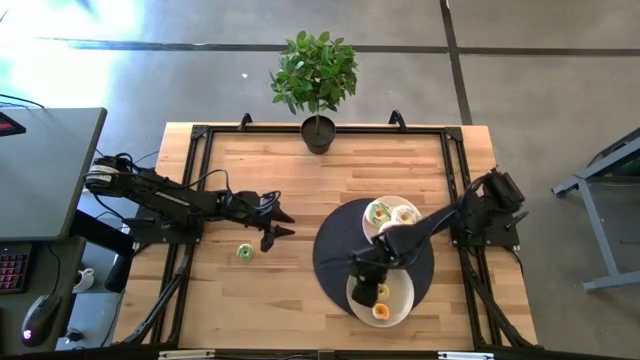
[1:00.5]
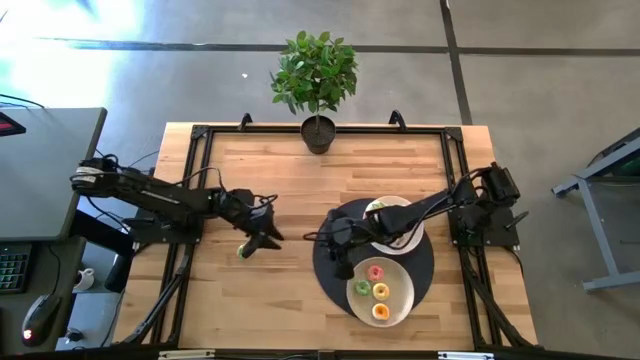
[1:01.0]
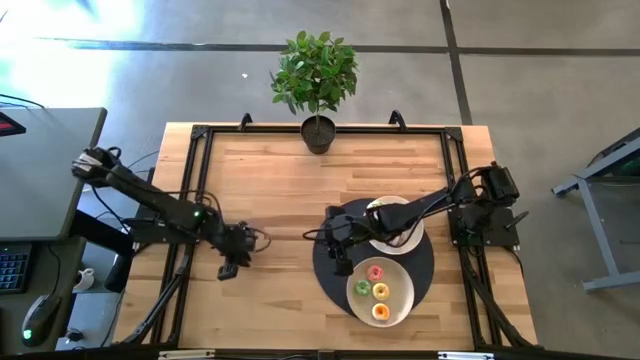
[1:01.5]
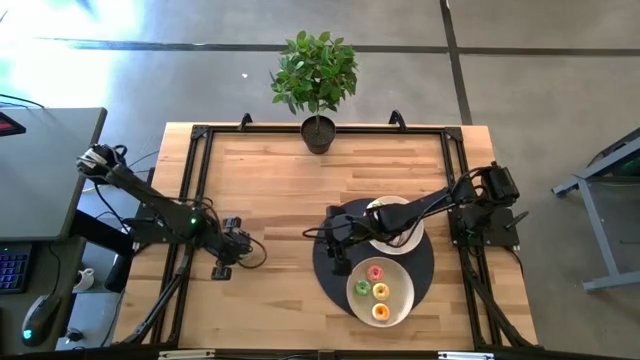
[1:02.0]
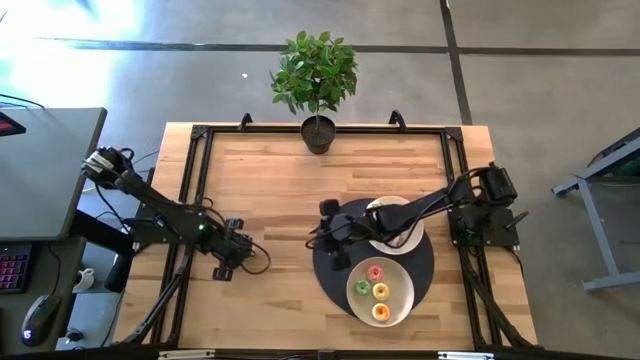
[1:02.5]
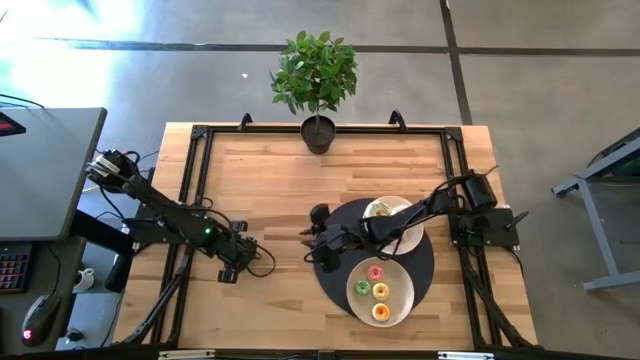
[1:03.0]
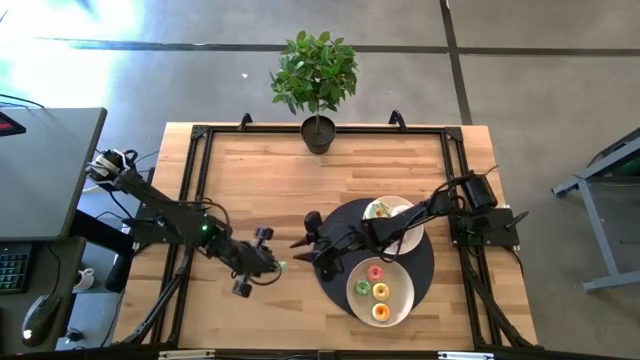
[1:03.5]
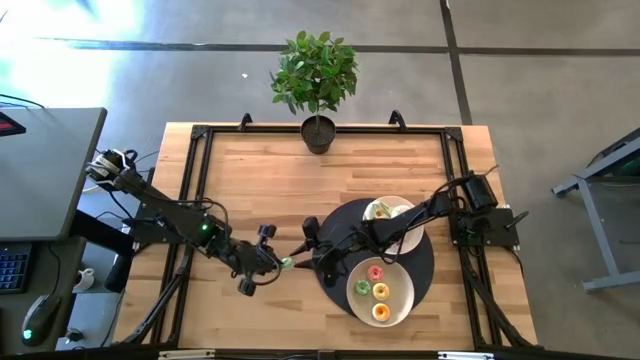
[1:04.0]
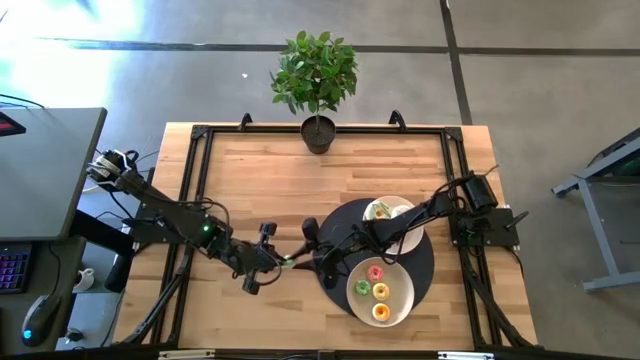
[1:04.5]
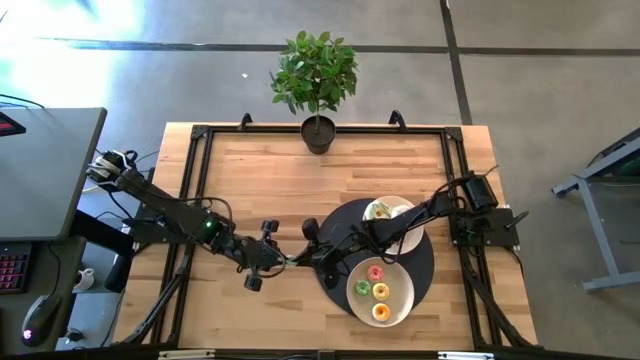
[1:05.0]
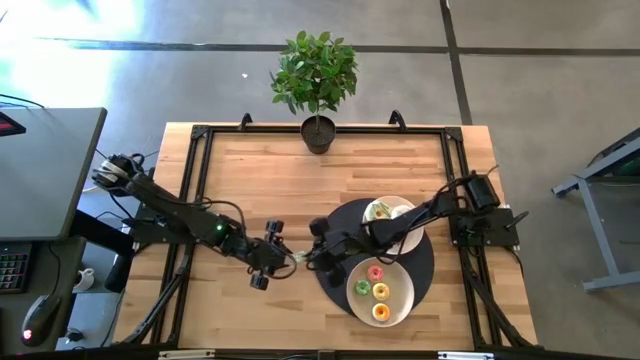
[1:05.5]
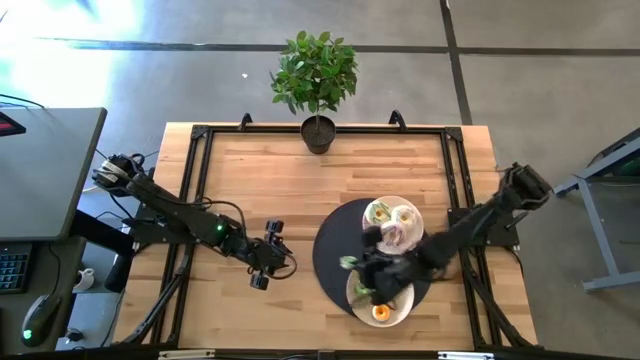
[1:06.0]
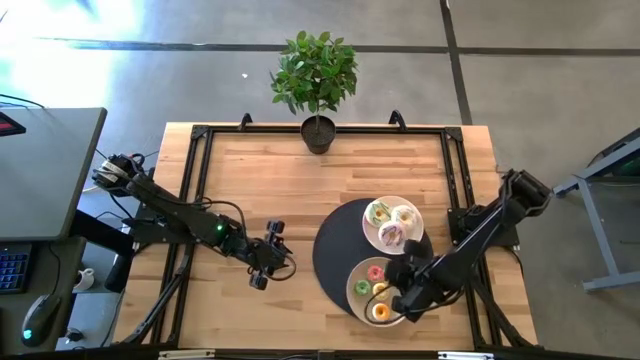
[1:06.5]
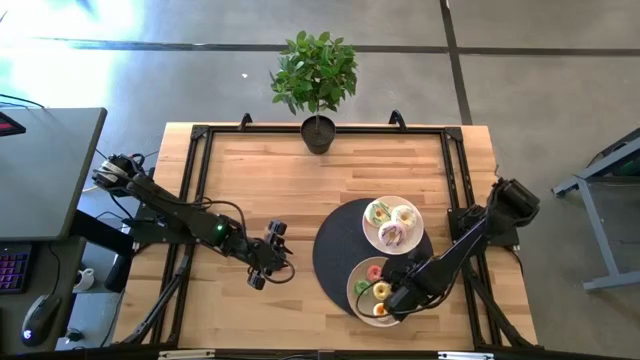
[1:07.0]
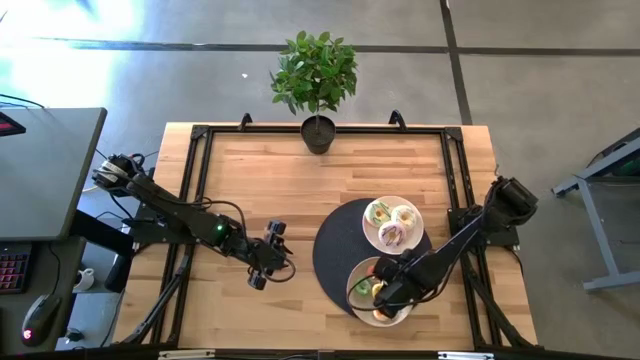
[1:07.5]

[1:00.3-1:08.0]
Task: Pick & Place donuts
Put the small green donut on the bottom white plate

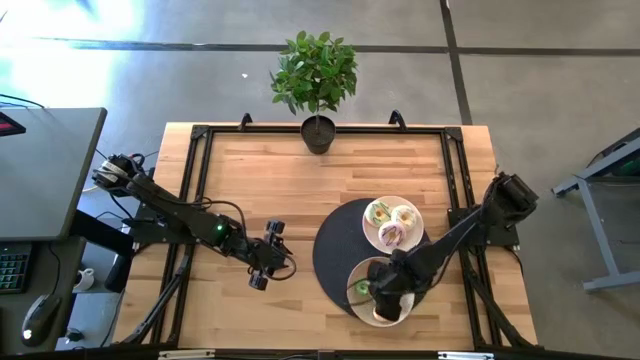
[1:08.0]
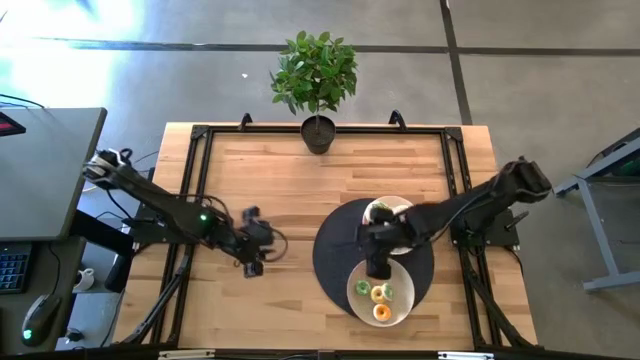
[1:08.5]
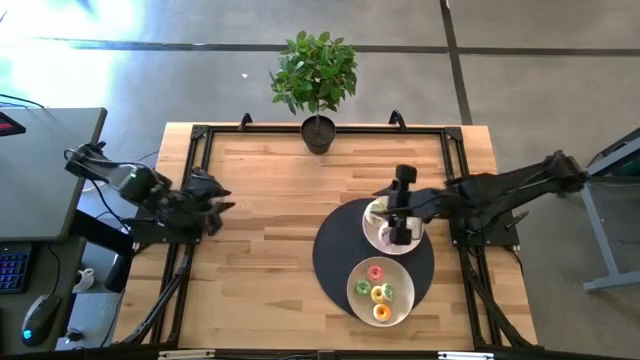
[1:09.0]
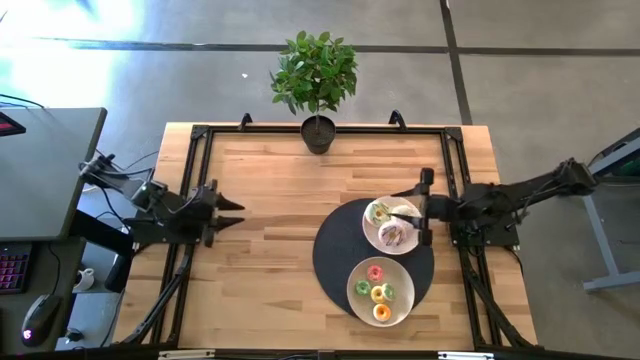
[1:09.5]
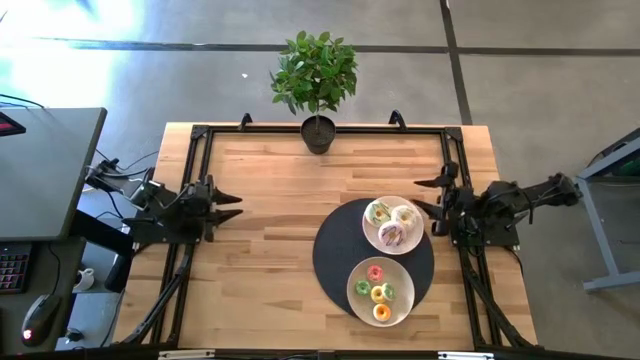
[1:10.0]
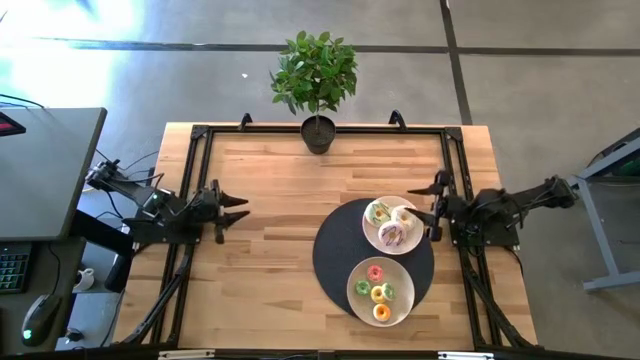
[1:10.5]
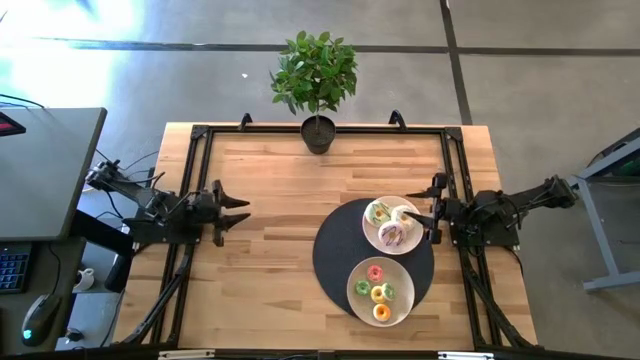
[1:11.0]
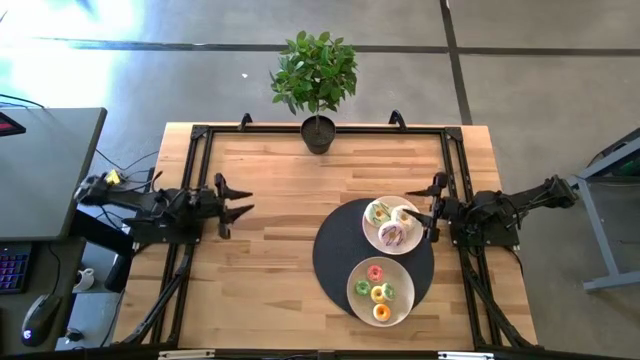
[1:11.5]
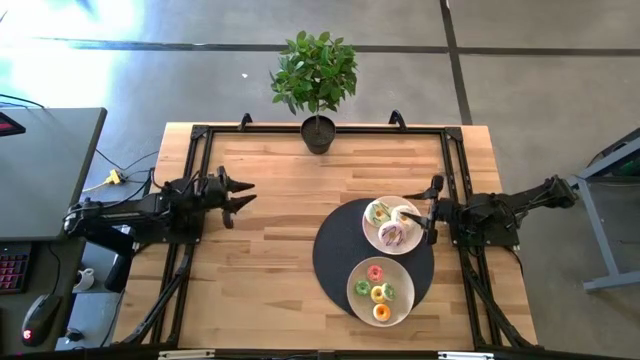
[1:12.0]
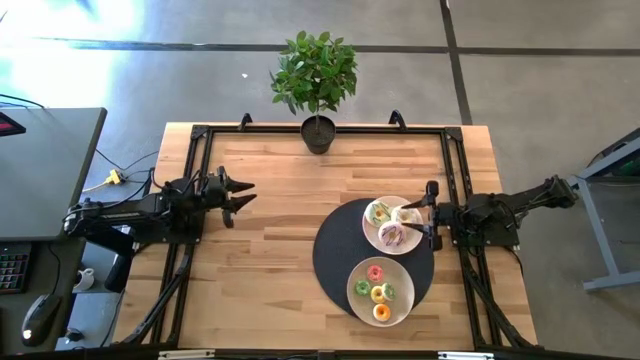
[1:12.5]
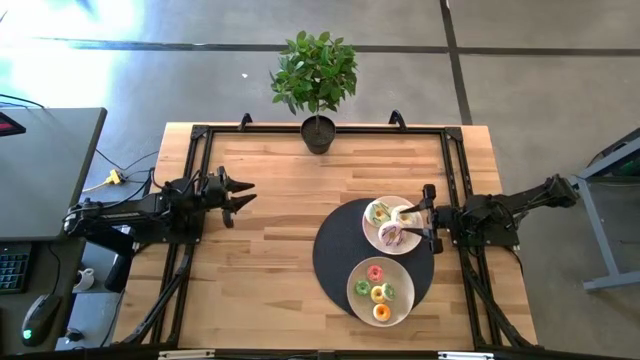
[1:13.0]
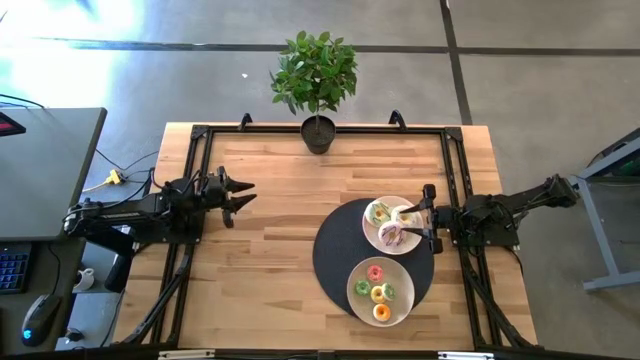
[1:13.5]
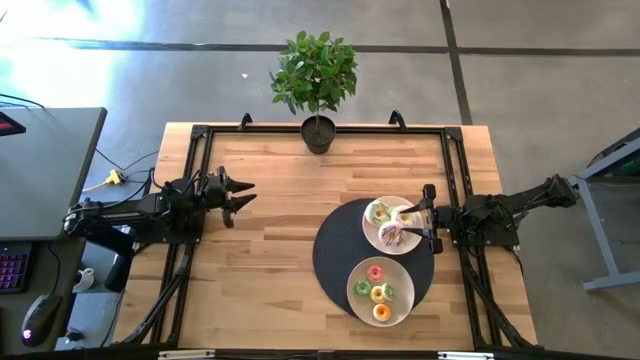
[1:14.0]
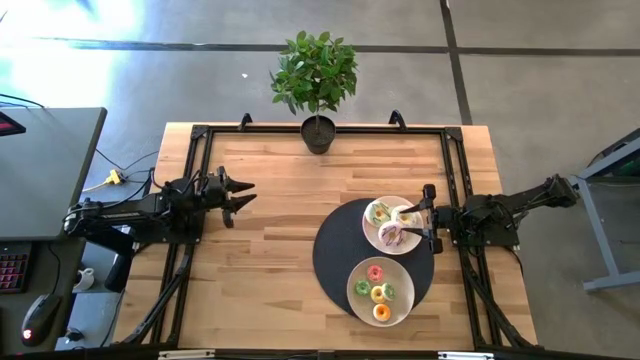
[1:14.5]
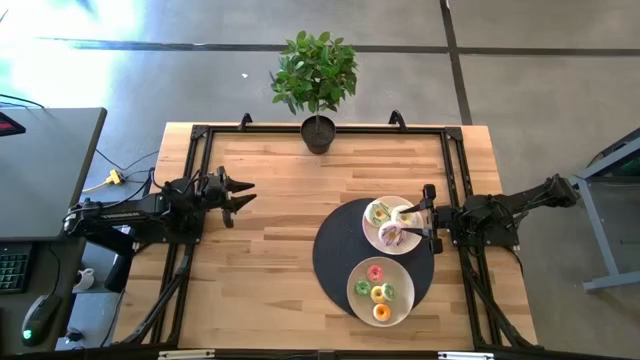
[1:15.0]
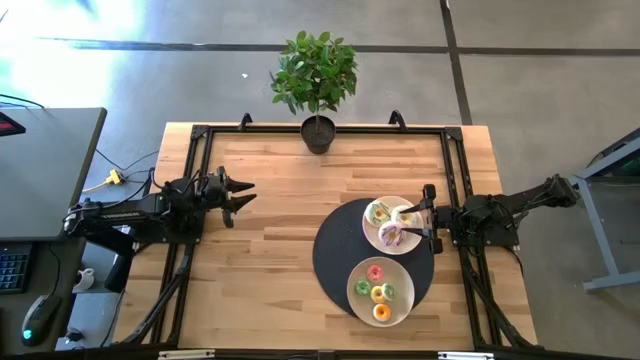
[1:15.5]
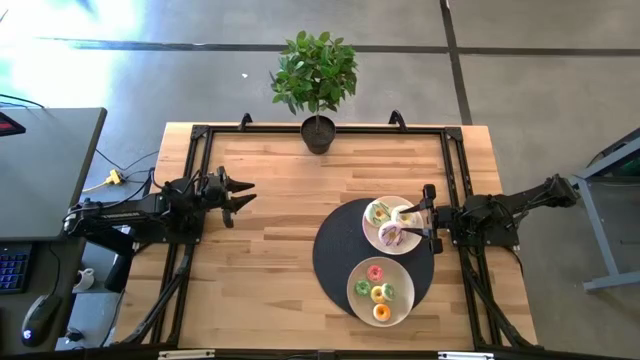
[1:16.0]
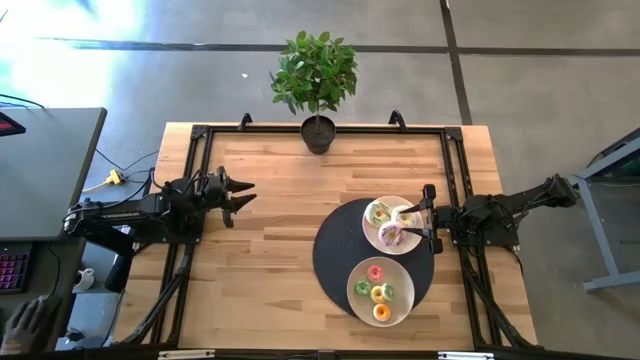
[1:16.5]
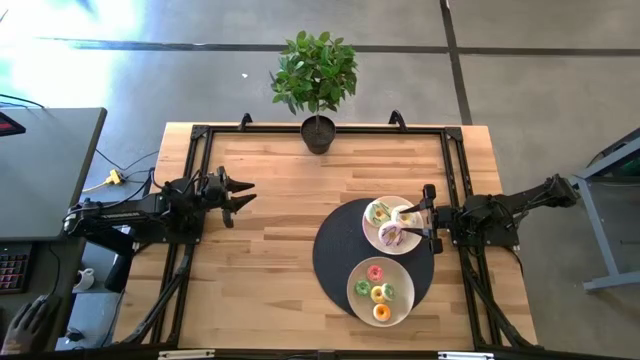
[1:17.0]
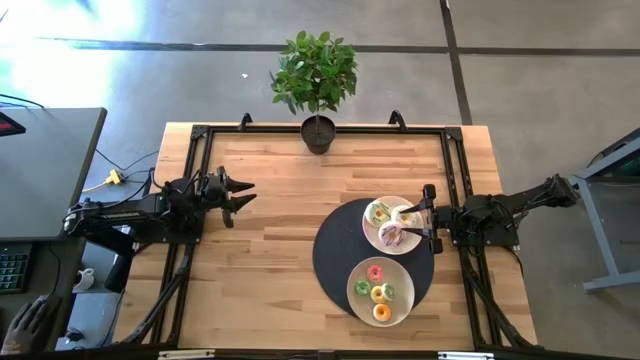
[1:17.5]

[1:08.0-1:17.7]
Return to Home Position

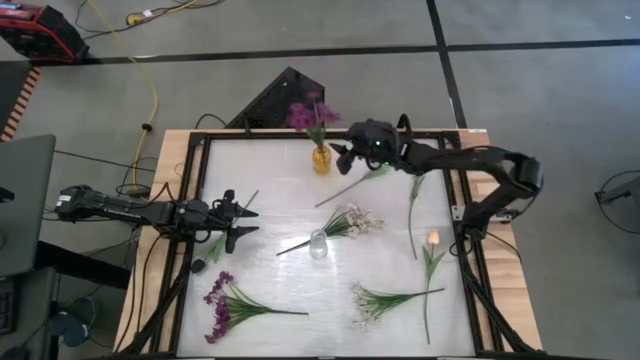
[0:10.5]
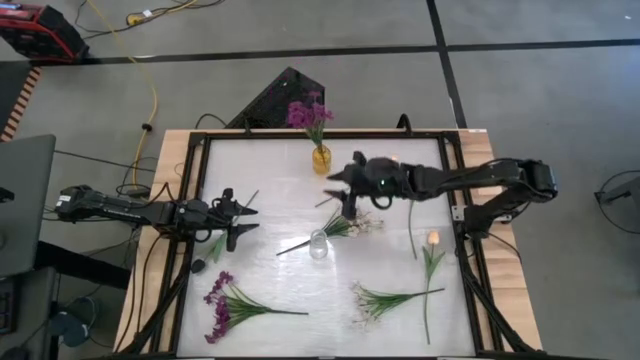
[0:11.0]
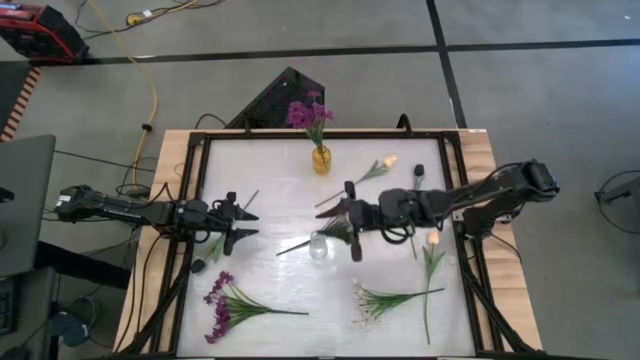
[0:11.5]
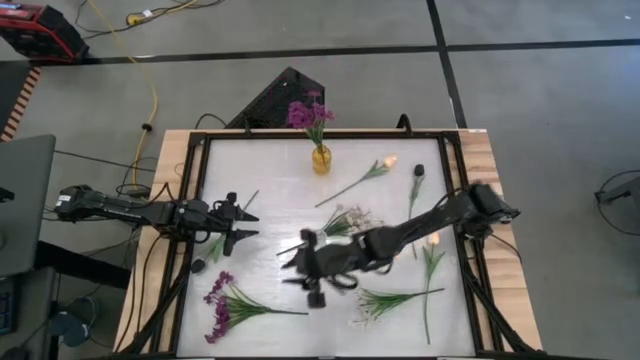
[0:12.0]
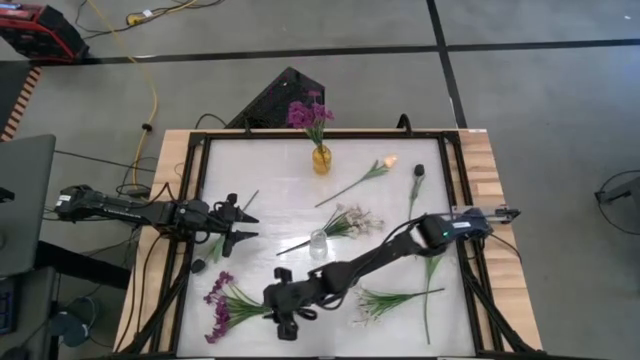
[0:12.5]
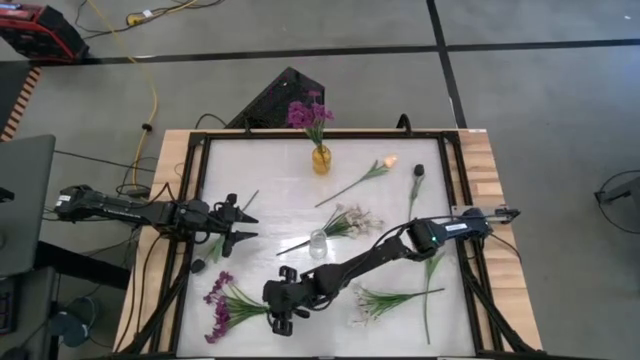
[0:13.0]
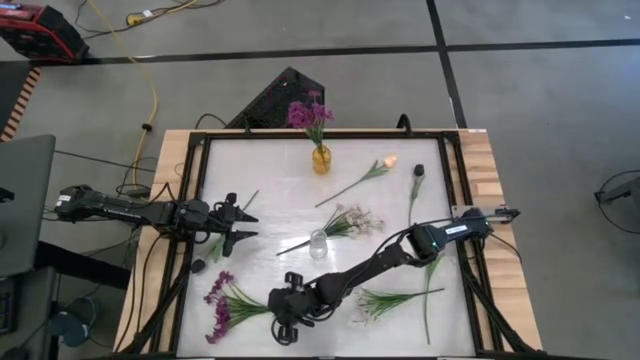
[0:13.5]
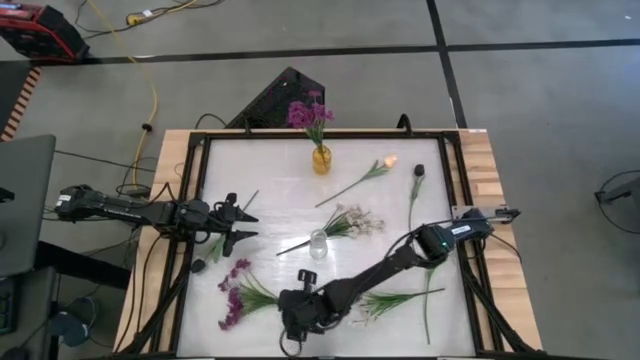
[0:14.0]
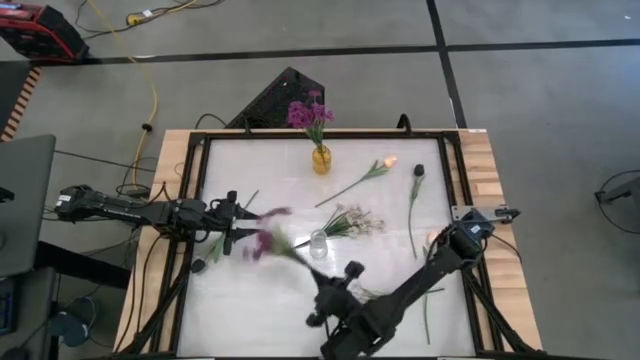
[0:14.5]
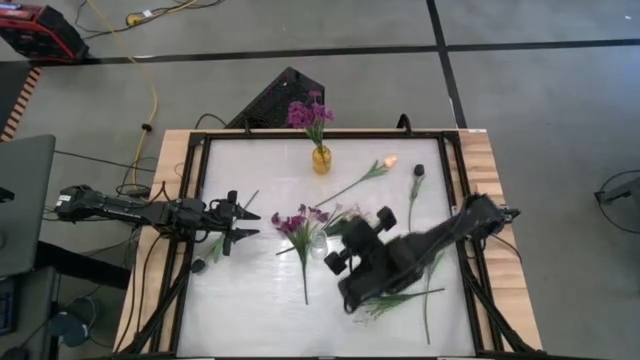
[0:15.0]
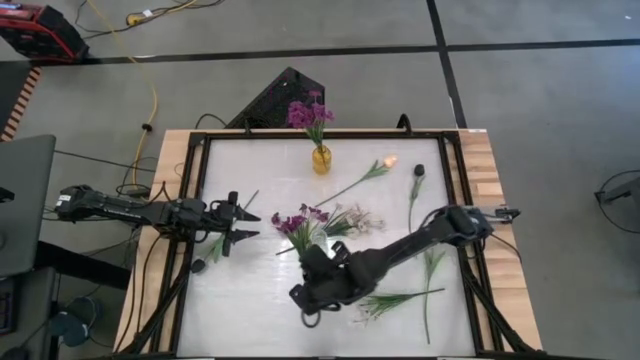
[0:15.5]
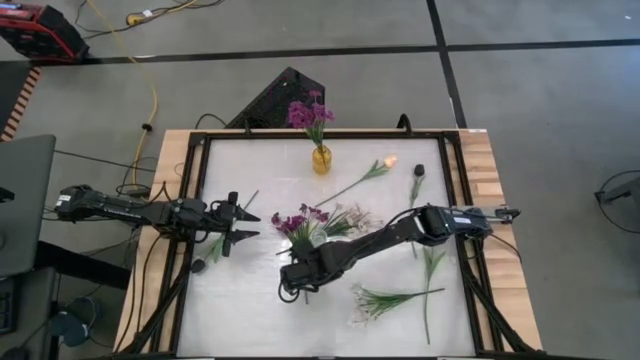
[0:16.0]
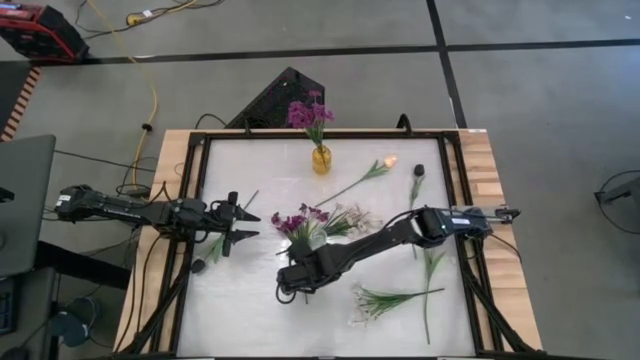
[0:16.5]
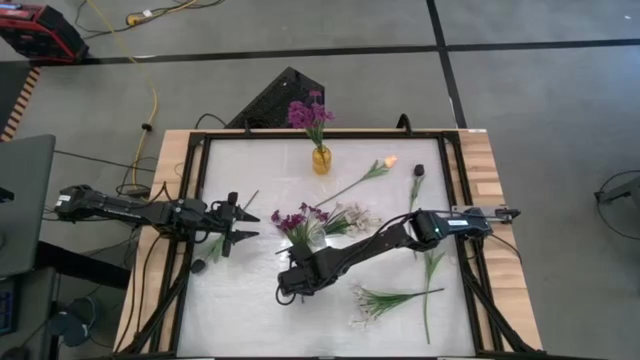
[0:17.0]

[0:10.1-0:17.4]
Task: Sort flowers into vase by color
Put the purple flowers into the yellow vase
